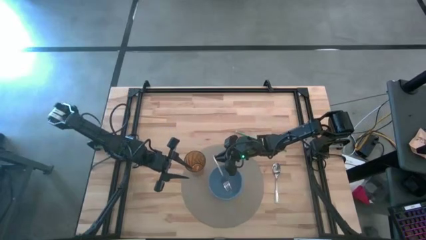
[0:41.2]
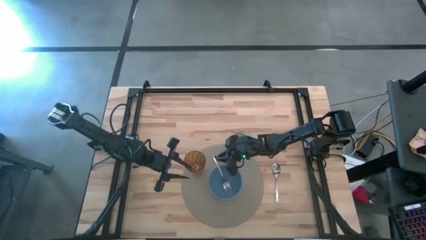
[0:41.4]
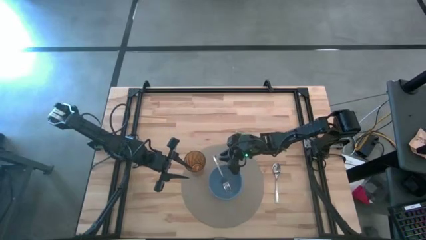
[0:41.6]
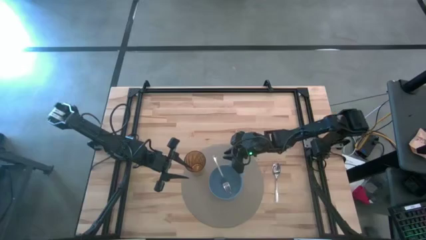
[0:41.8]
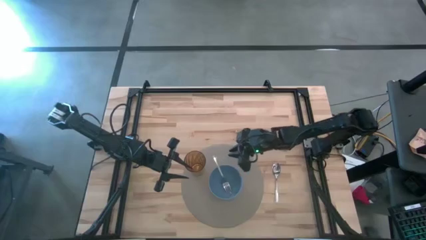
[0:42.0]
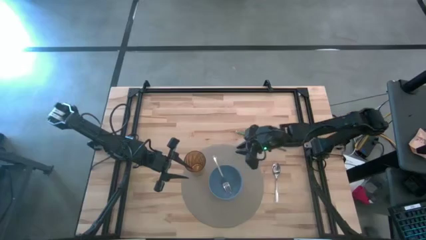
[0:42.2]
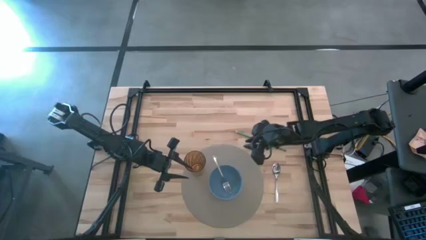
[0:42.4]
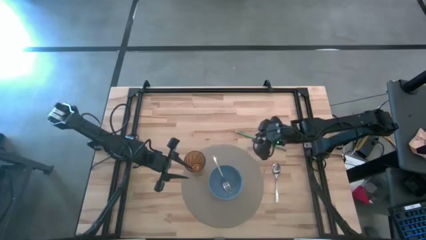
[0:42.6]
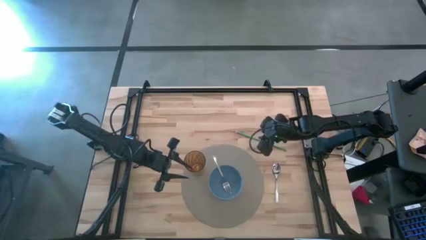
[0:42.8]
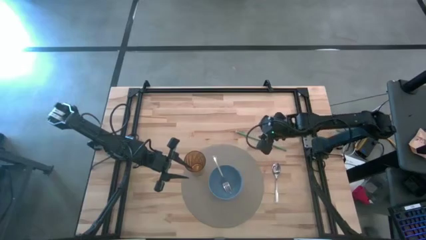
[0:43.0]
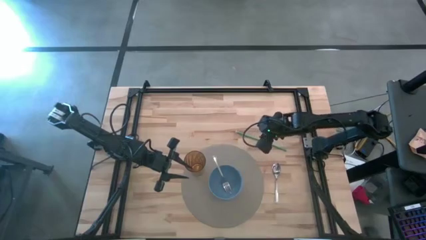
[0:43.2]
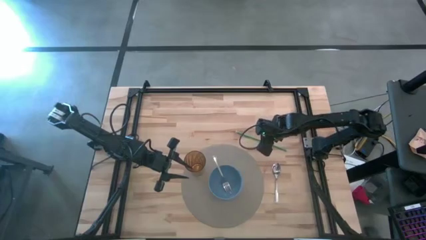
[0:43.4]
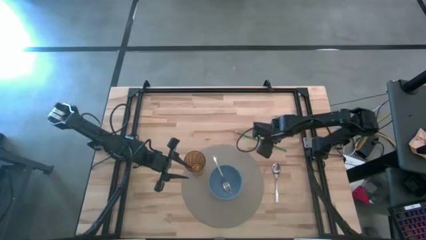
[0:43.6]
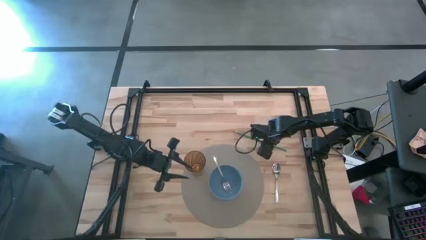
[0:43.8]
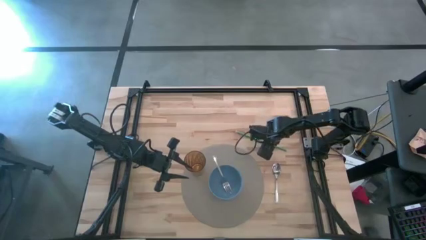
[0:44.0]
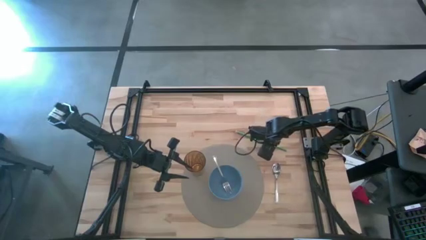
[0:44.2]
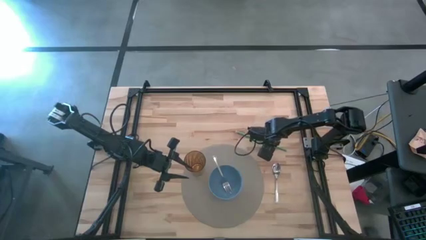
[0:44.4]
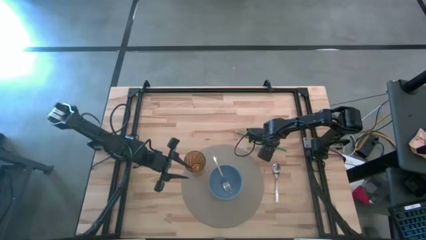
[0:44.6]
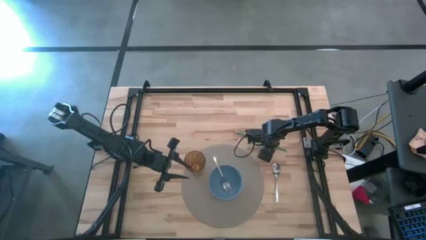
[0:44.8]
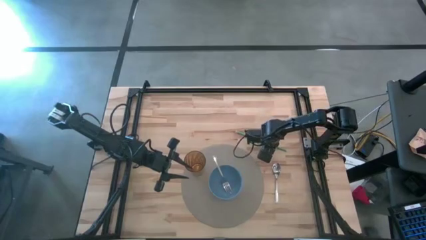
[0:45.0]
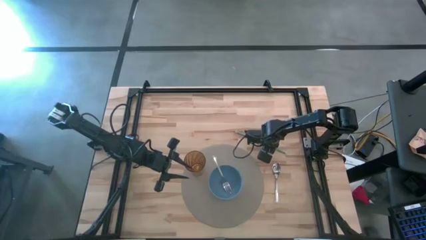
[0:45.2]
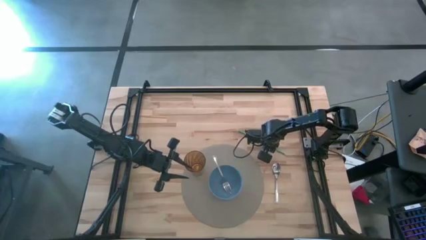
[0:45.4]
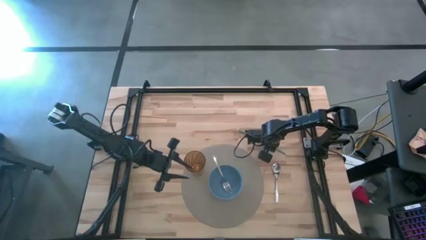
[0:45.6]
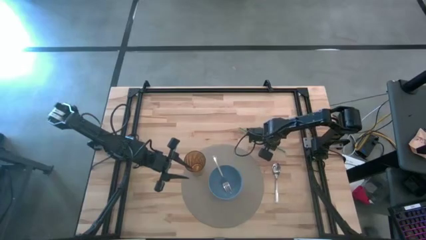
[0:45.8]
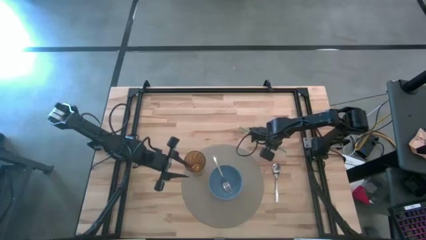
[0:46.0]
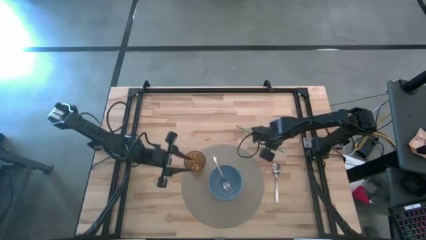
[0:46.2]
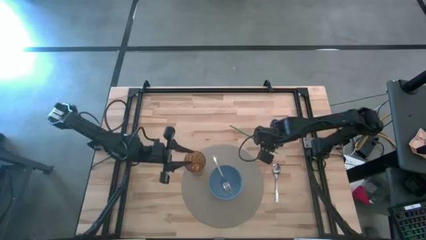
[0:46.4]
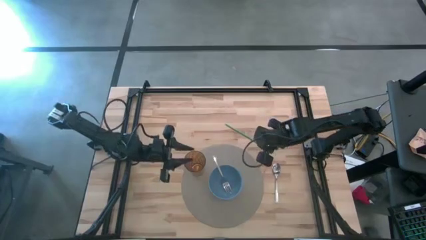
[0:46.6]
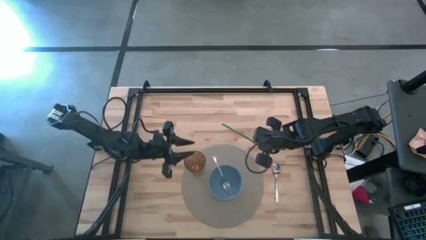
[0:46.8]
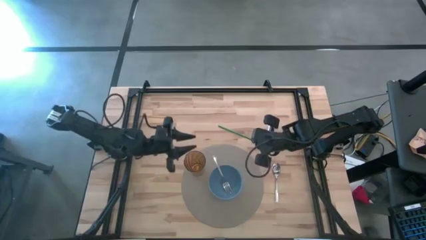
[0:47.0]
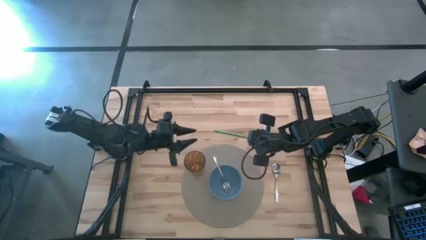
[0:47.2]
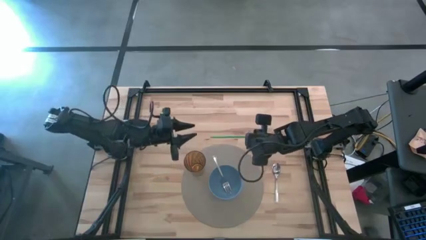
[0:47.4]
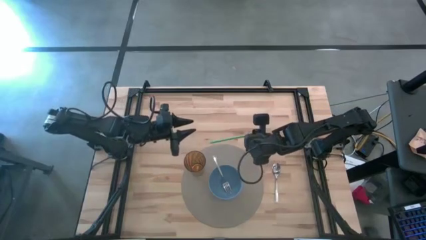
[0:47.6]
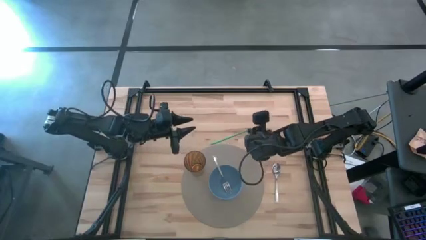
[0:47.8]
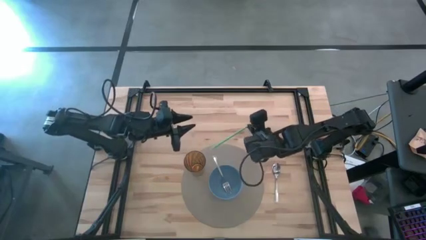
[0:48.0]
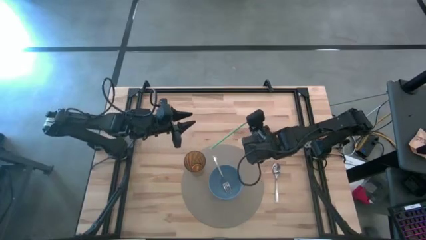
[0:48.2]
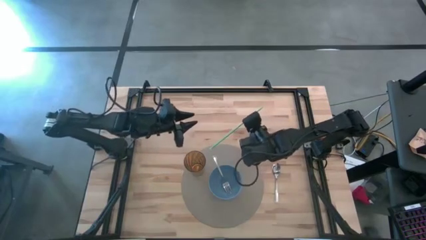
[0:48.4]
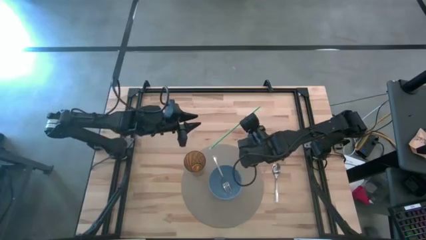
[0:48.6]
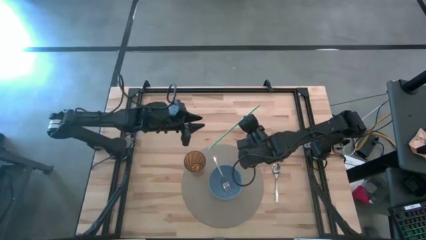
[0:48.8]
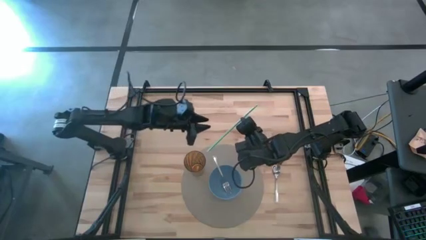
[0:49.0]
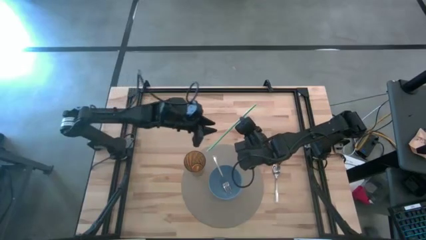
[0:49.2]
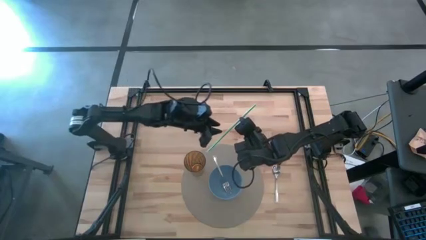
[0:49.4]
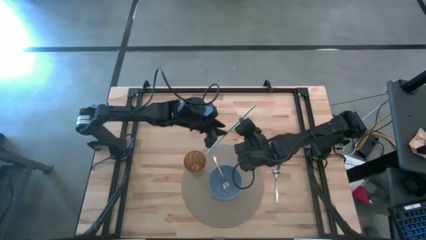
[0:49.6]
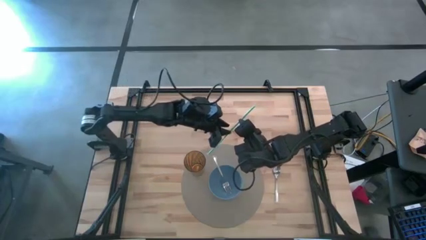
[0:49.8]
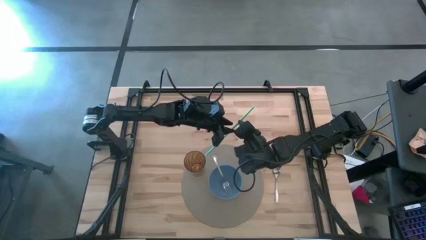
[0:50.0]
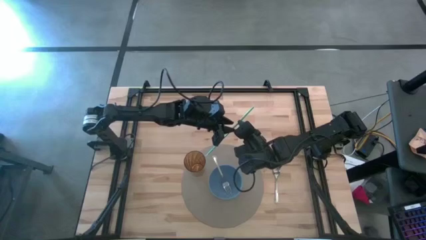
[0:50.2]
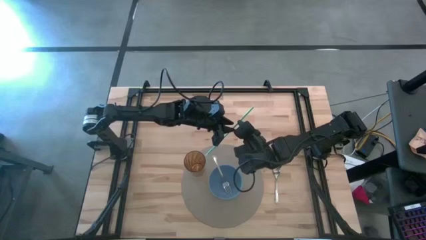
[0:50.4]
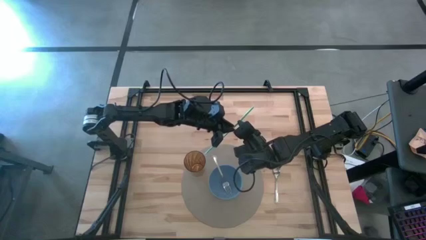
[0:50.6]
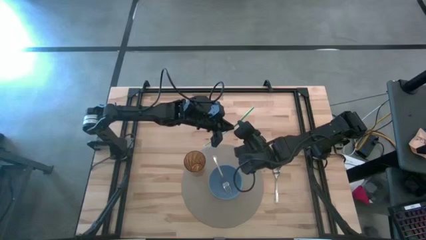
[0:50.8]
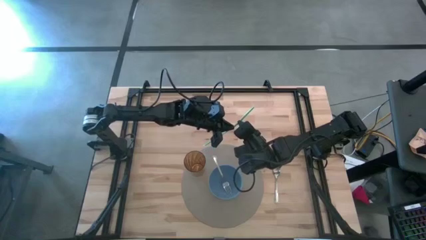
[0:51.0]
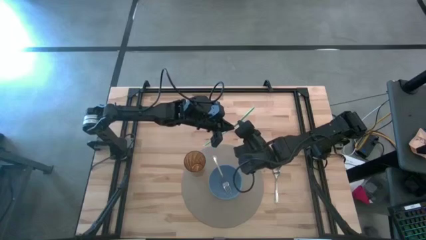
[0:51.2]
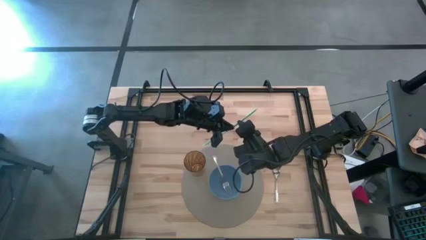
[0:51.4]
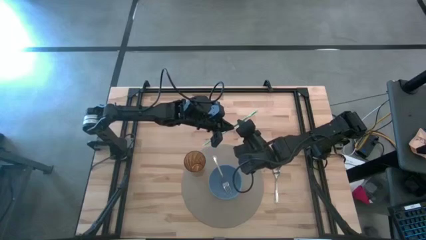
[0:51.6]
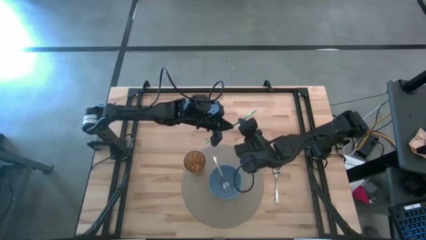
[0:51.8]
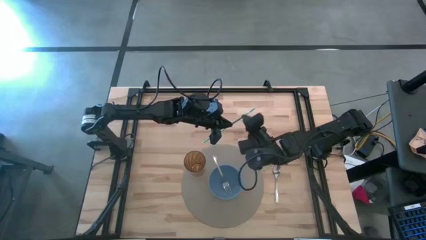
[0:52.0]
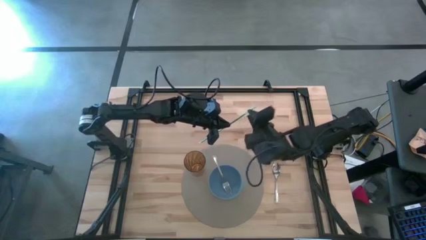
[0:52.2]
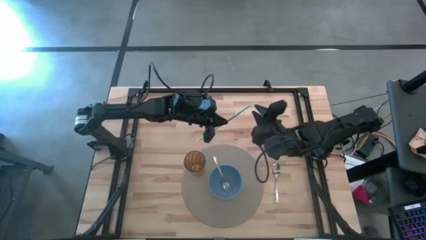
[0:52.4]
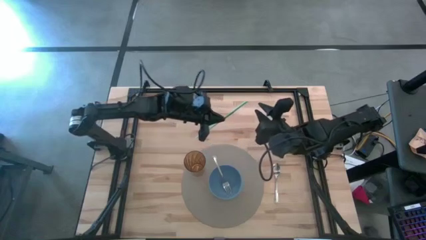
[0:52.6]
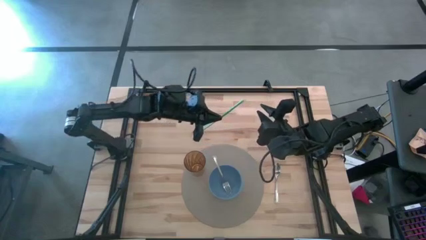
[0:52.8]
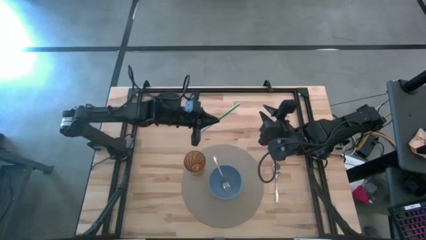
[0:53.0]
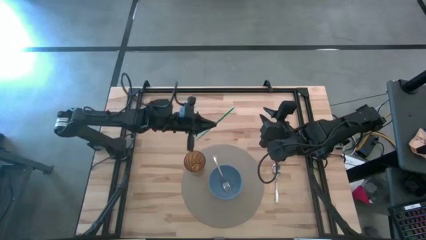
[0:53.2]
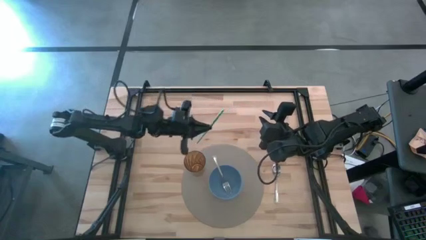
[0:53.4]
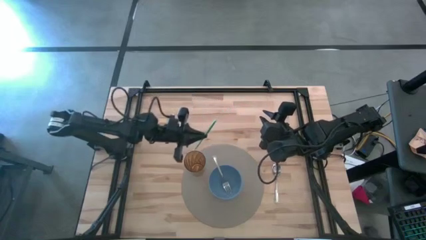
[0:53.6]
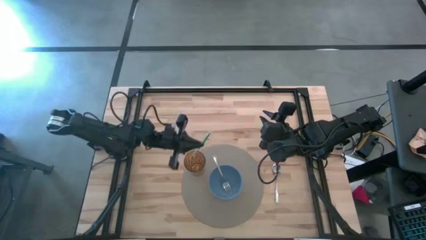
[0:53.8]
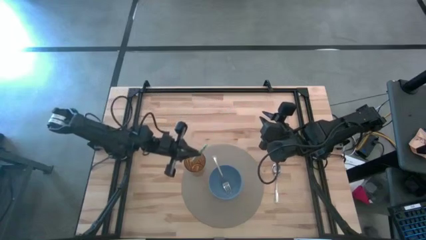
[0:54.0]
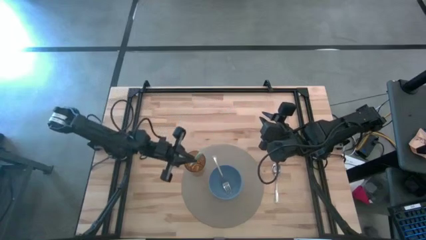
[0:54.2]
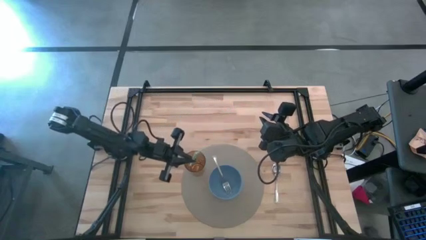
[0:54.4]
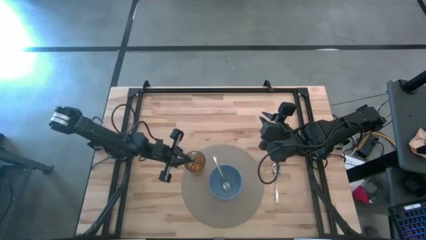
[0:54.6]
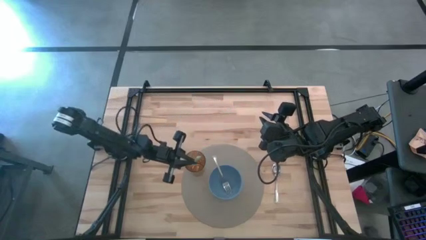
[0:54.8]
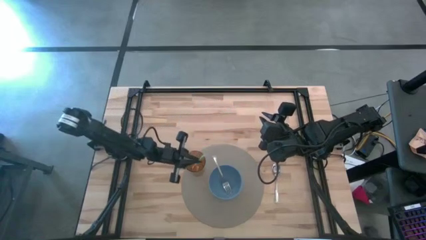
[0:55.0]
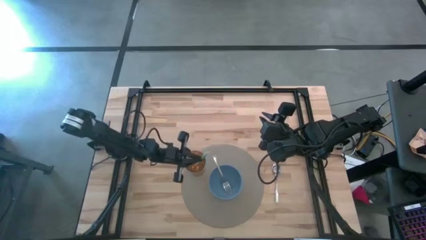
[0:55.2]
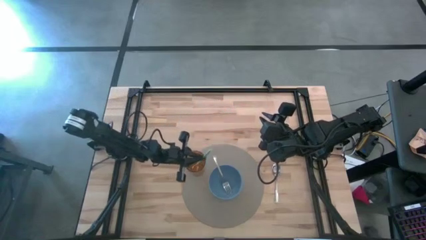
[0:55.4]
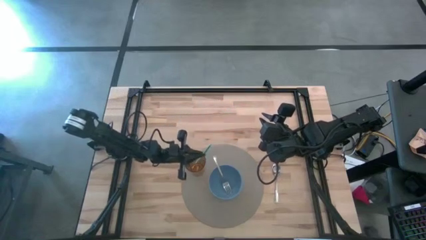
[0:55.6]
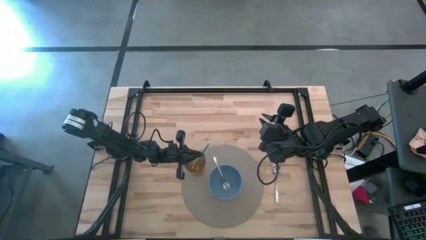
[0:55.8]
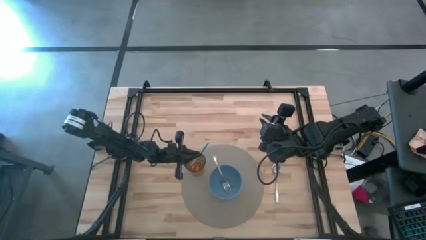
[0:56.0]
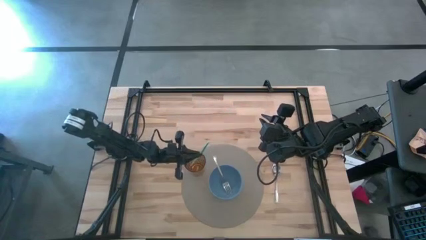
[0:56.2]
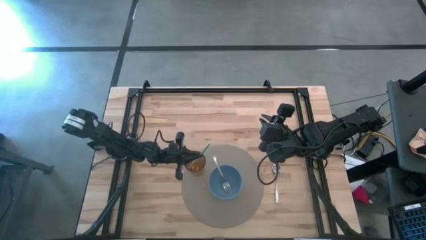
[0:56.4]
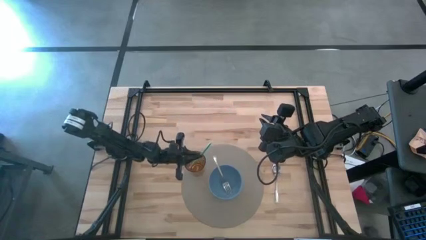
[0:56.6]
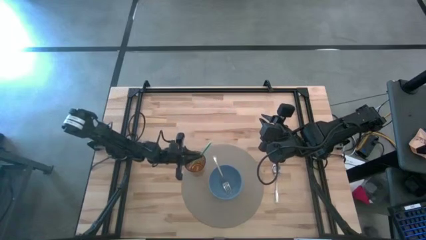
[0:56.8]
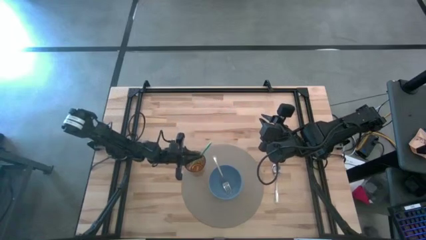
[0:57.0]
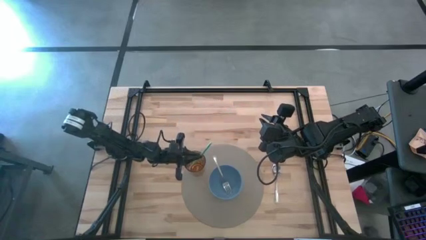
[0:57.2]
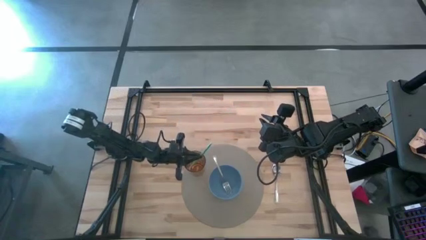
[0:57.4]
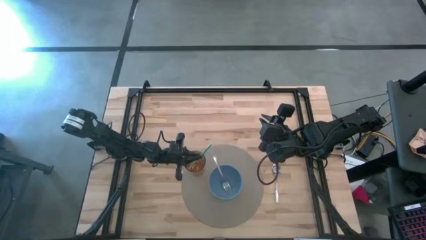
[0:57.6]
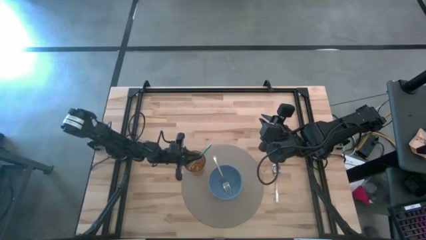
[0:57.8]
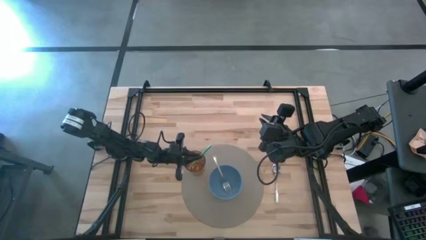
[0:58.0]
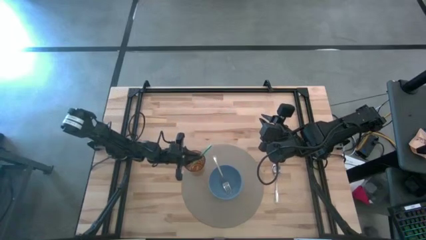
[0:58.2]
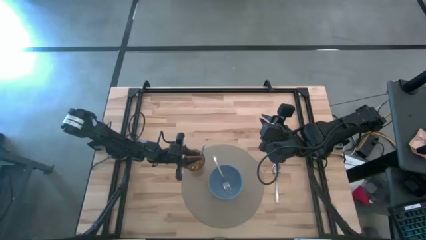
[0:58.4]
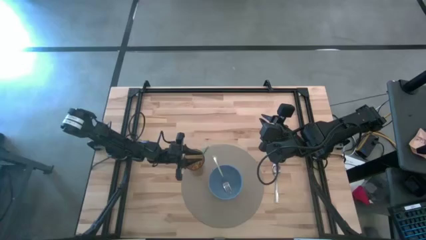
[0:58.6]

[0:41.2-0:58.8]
Task: Pick & Place Utensil
Put the straw into the cup on the place mat
